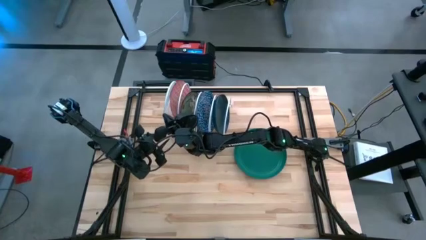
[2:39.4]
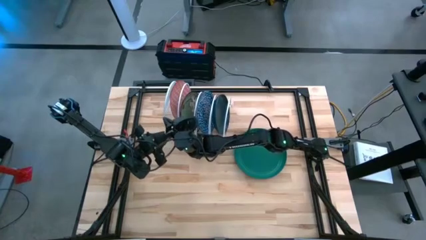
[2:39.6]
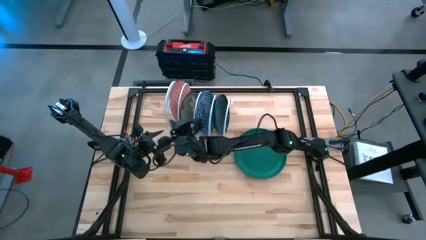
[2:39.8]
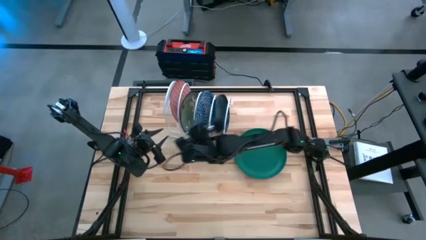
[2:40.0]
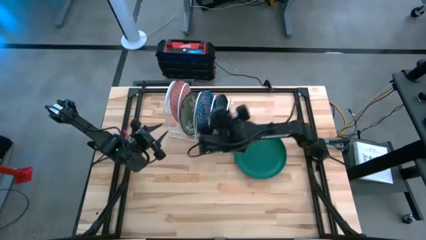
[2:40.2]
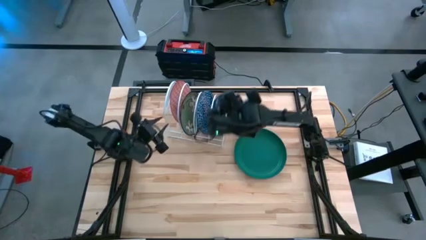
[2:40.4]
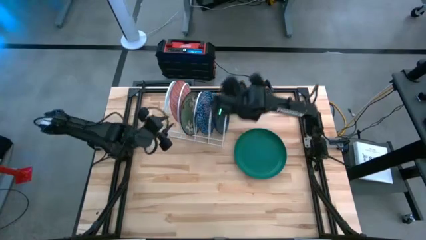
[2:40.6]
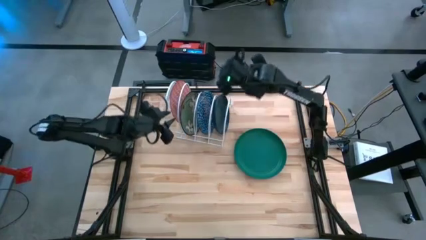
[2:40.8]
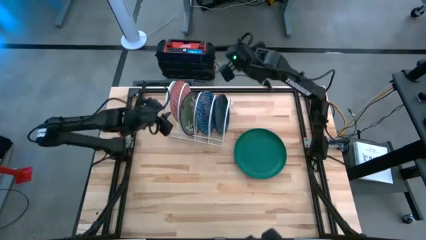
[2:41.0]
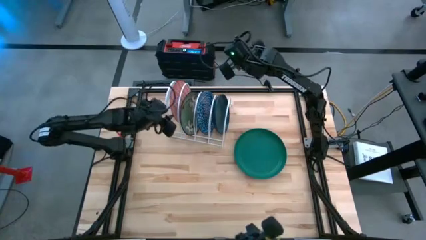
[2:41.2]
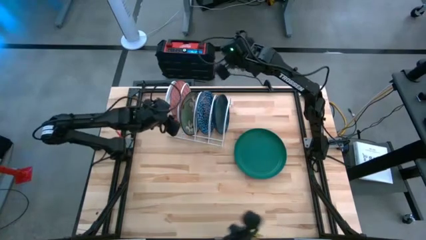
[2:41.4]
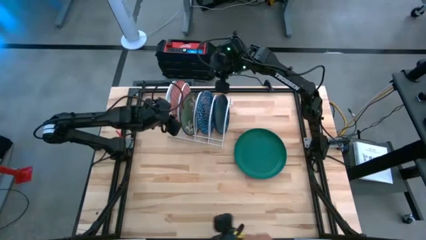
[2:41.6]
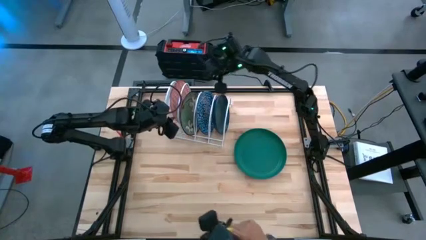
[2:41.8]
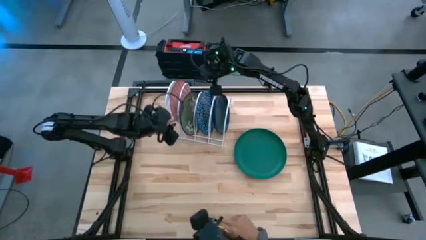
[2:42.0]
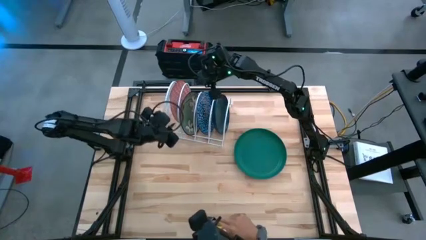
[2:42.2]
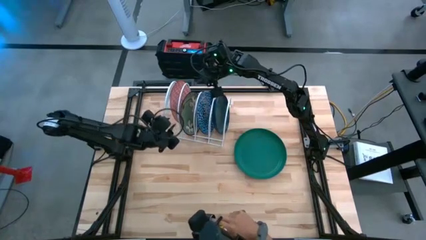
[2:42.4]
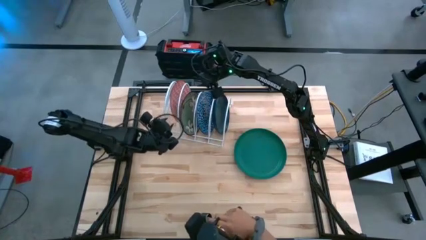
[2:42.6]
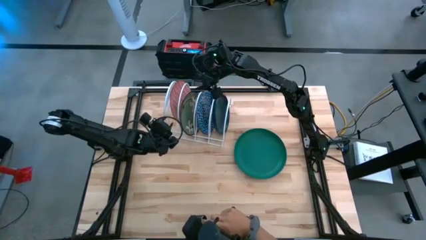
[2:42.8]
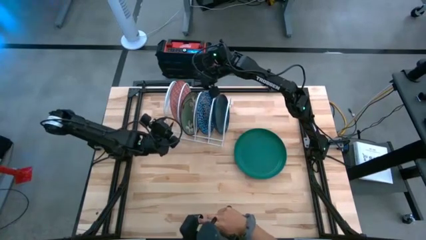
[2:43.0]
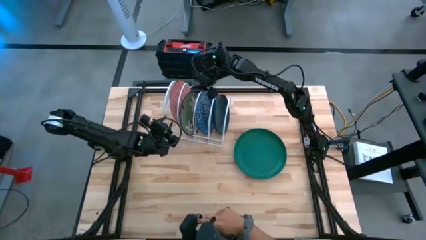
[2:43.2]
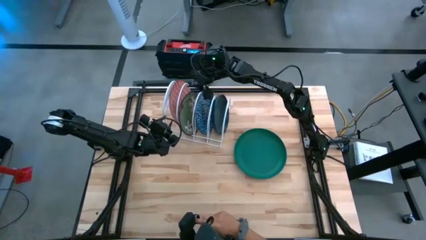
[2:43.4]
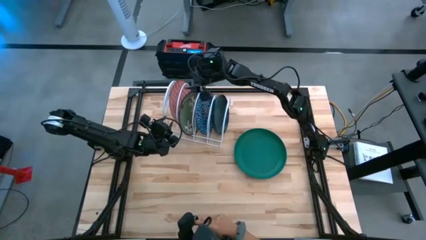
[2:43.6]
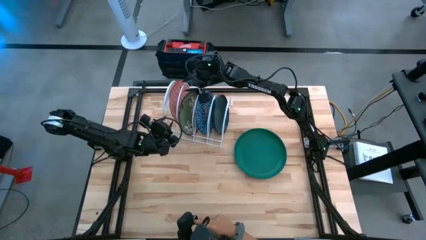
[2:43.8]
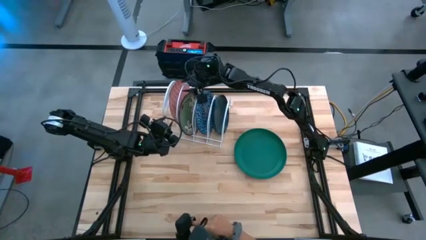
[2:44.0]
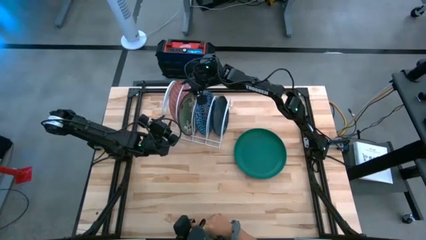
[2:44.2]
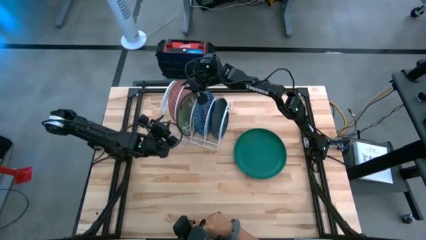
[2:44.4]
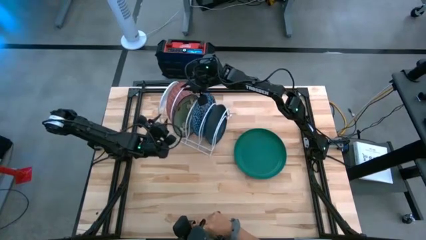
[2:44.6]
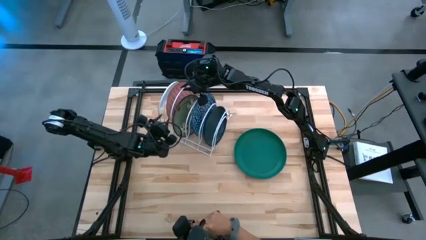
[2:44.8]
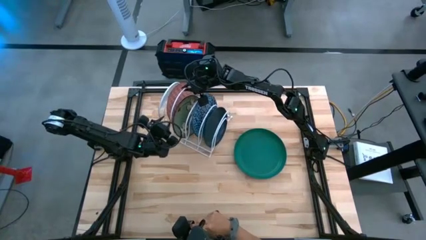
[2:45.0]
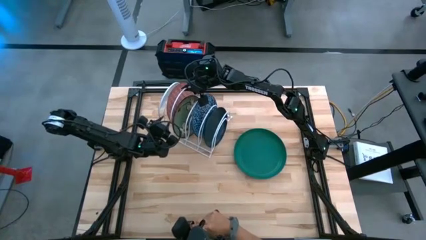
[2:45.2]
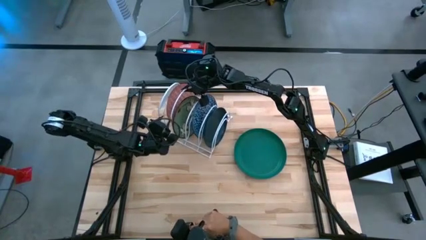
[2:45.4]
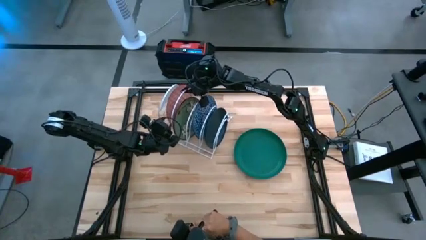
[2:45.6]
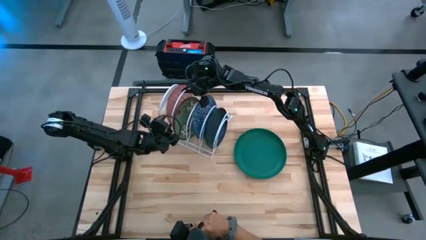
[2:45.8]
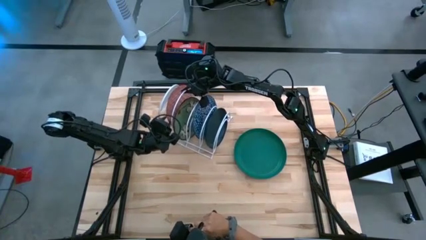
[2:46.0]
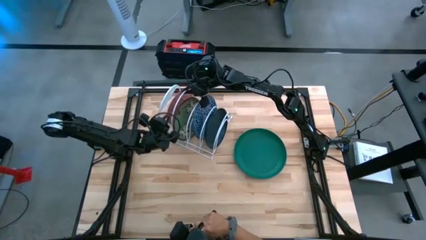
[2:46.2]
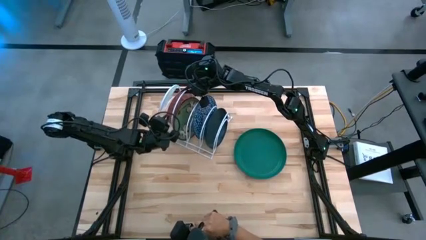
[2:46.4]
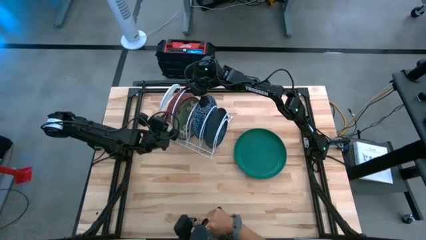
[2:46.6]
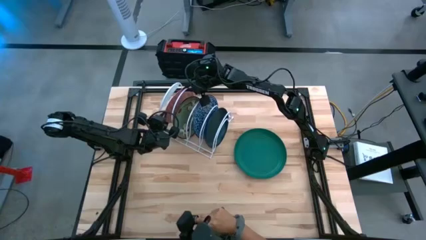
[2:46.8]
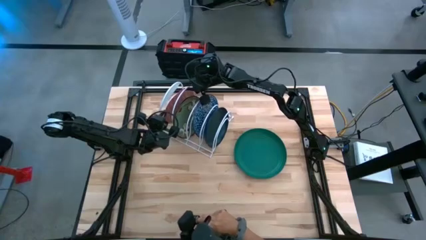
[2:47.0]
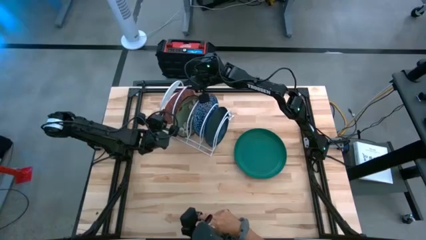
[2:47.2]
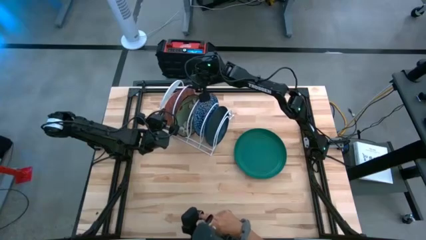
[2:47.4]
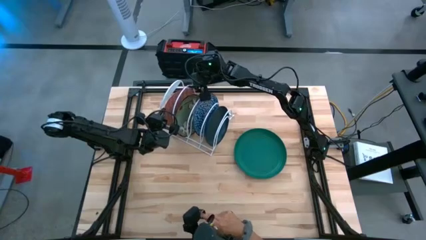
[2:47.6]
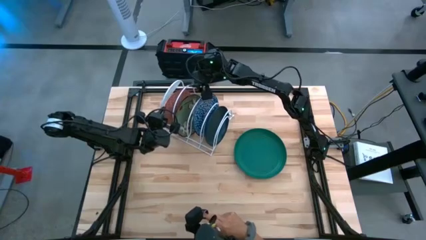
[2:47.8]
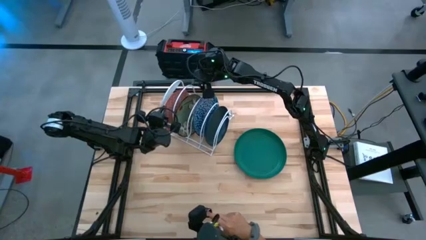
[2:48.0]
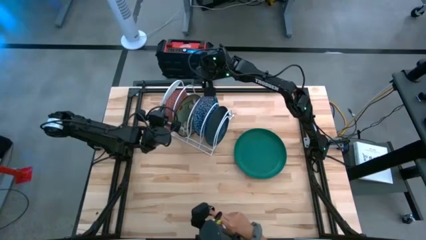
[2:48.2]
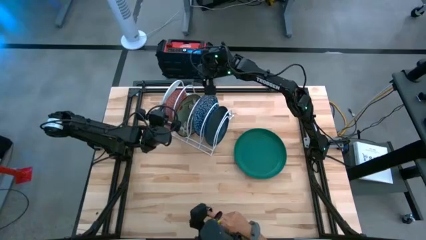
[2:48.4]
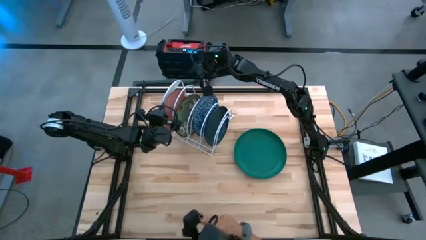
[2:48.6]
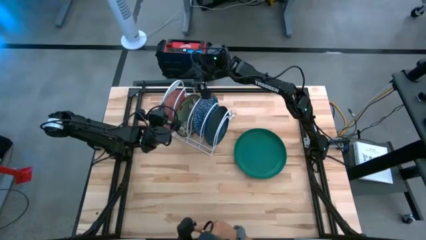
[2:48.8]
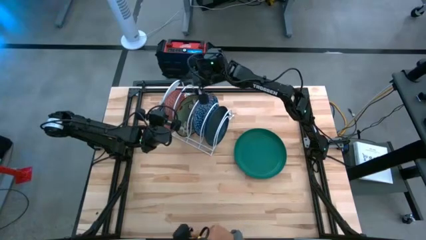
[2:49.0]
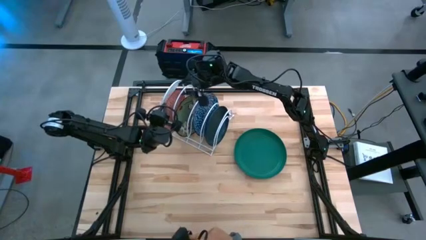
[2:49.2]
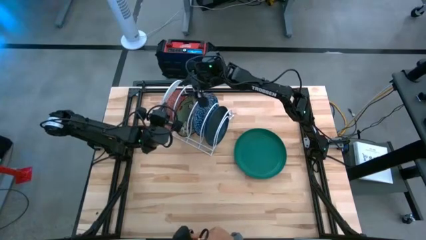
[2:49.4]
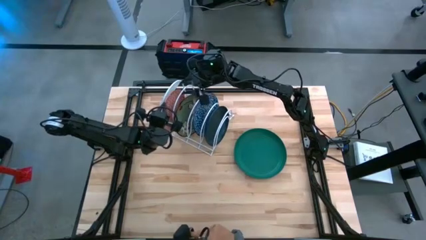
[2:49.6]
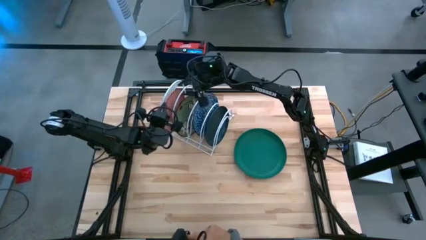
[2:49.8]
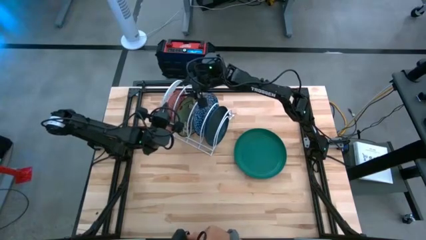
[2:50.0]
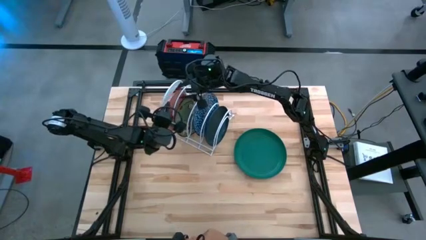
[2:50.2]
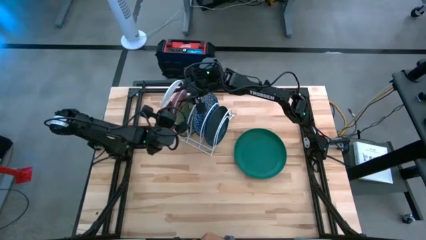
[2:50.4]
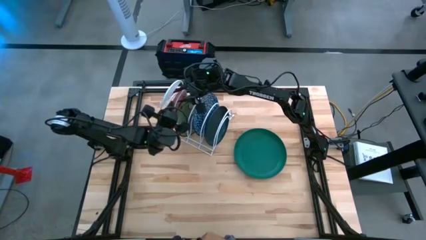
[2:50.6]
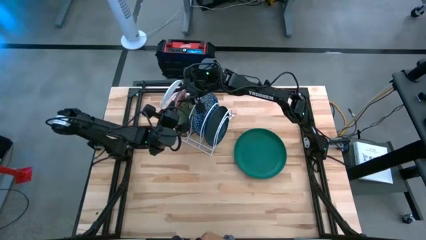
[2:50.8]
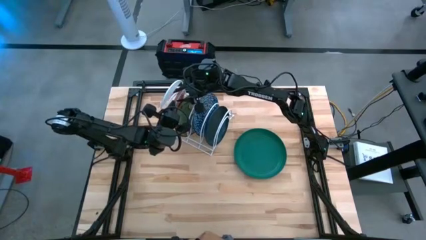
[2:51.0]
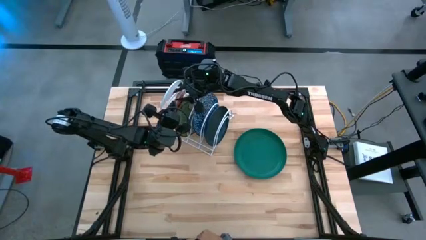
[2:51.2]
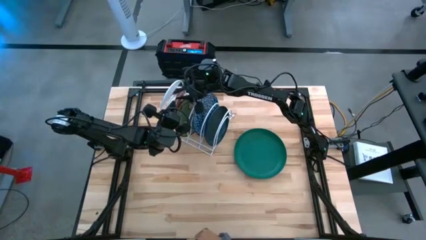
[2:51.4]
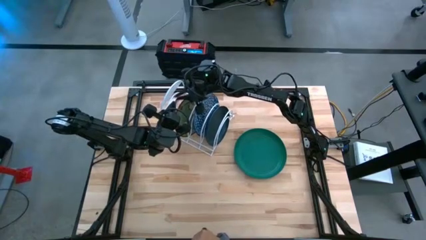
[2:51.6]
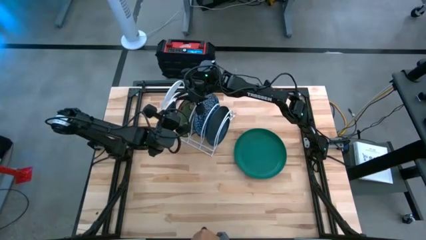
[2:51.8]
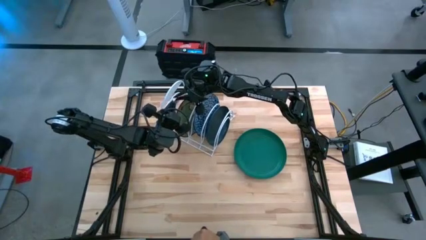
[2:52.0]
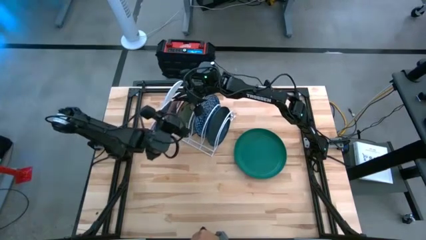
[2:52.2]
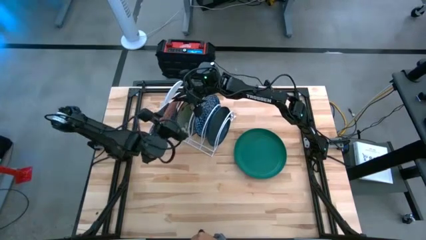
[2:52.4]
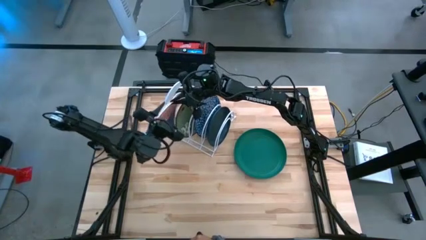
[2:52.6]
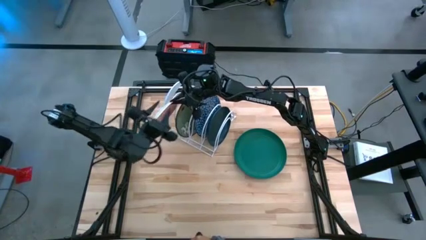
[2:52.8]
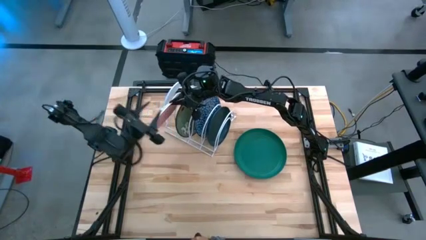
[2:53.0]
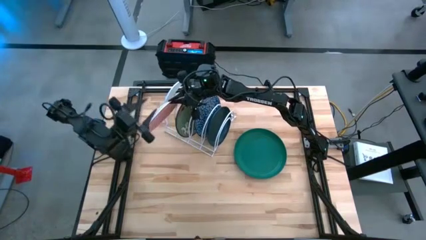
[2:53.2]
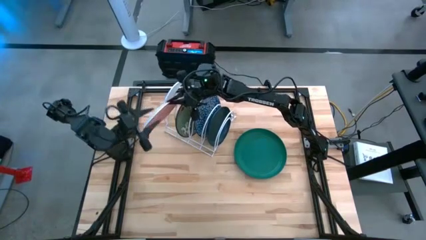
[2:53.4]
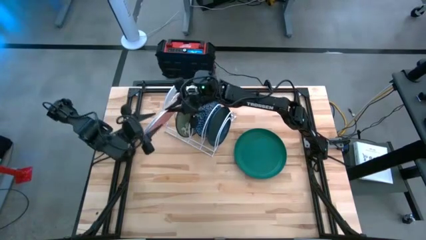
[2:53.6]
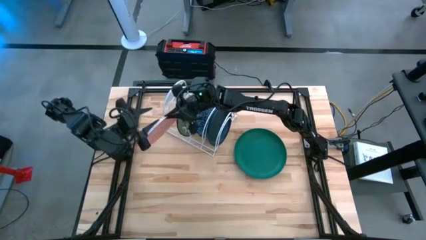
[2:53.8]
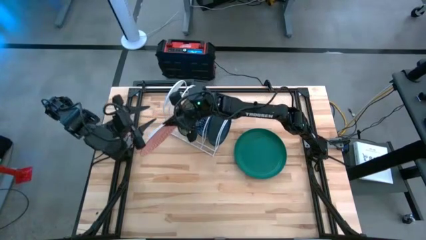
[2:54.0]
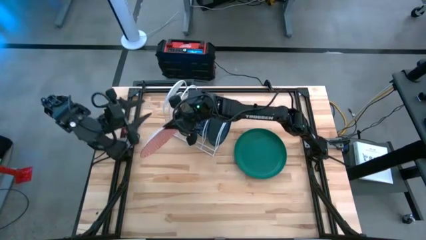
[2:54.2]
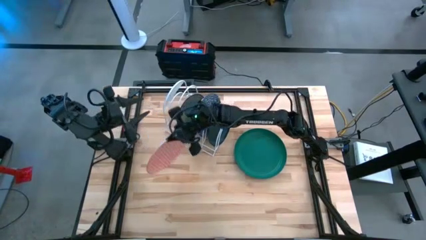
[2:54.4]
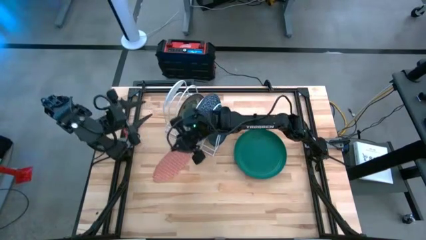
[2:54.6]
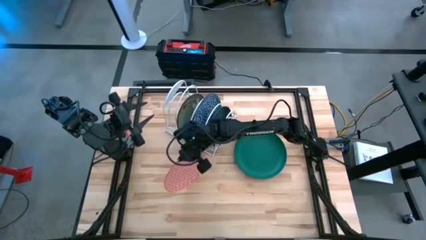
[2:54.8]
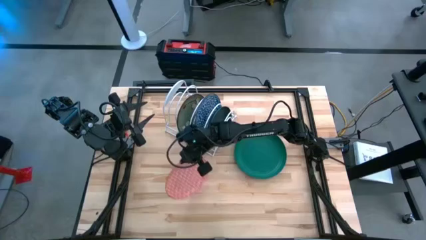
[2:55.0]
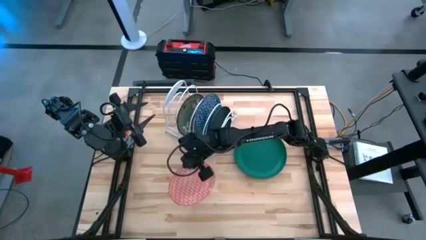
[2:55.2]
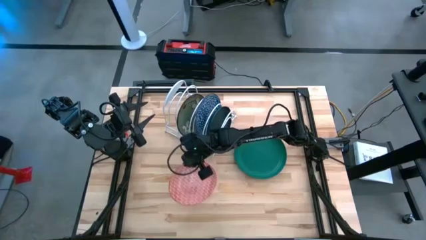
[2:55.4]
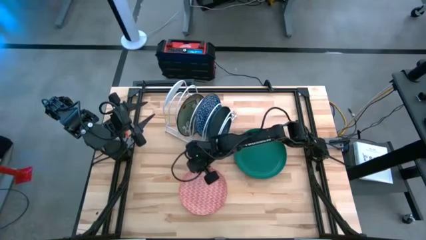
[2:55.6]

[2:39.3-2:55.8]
Task: Sort dishes
Remove the orange patterned plate from the dish rack
